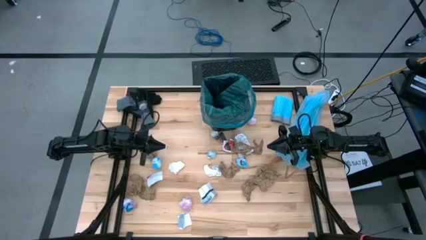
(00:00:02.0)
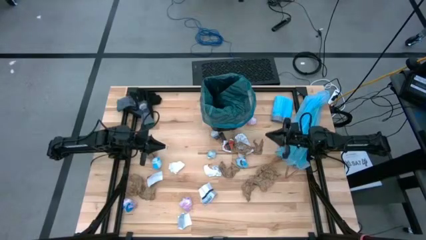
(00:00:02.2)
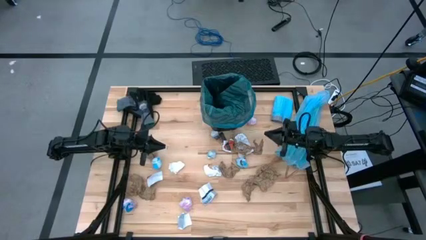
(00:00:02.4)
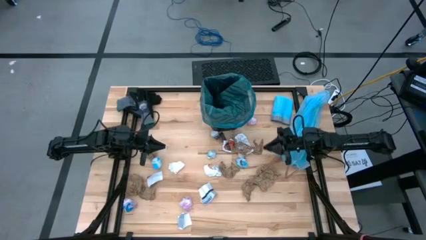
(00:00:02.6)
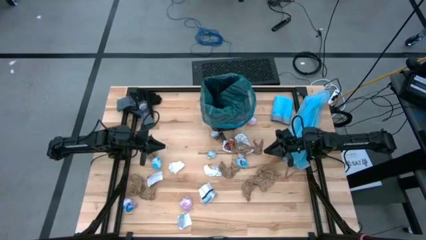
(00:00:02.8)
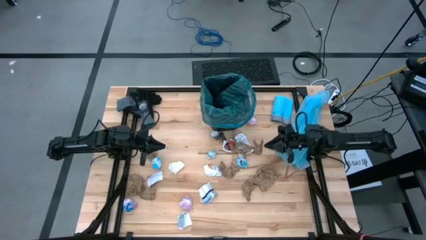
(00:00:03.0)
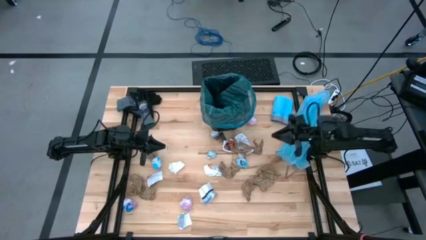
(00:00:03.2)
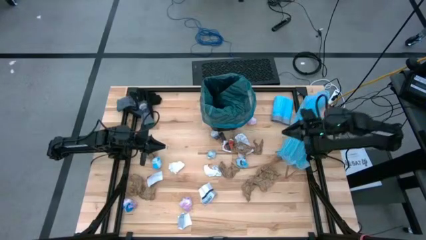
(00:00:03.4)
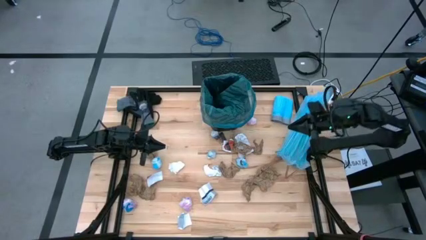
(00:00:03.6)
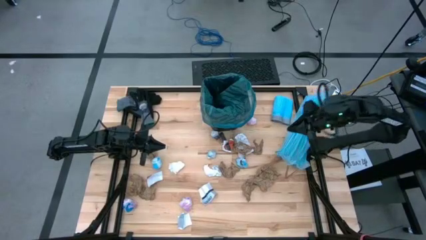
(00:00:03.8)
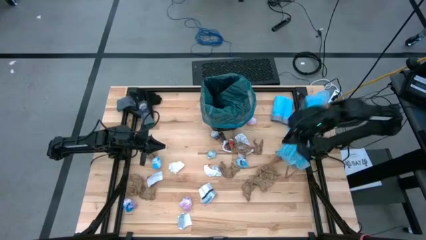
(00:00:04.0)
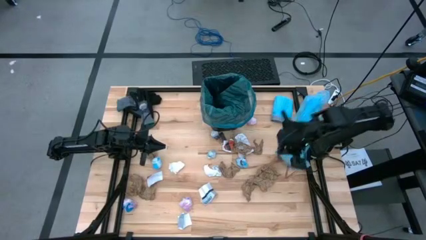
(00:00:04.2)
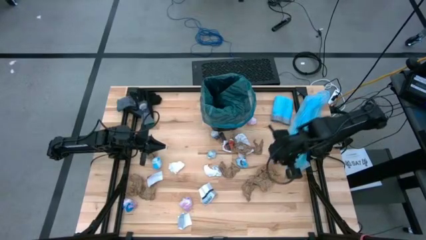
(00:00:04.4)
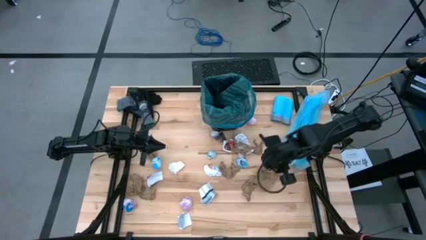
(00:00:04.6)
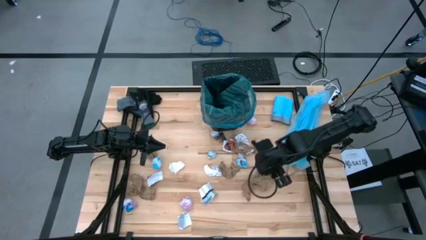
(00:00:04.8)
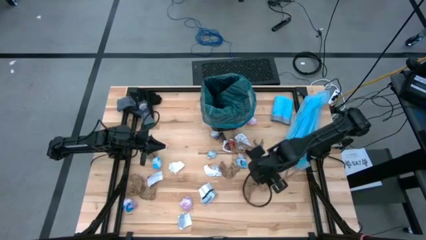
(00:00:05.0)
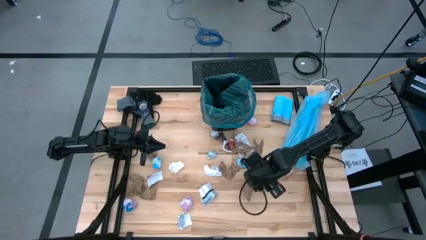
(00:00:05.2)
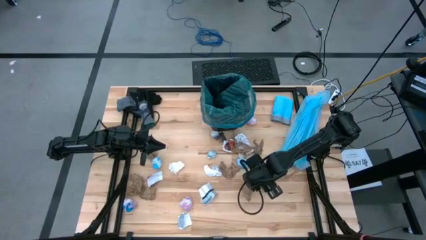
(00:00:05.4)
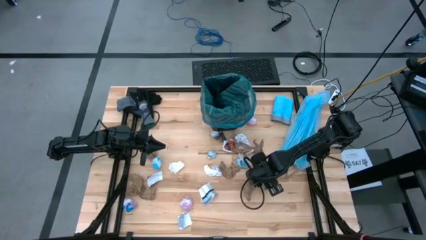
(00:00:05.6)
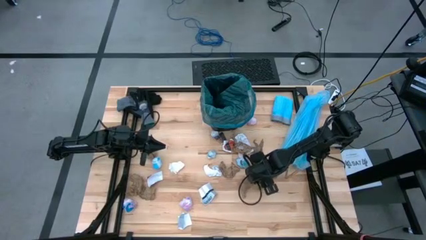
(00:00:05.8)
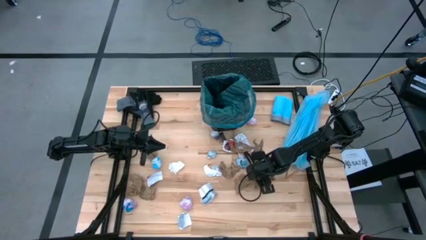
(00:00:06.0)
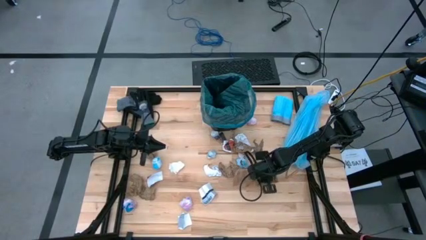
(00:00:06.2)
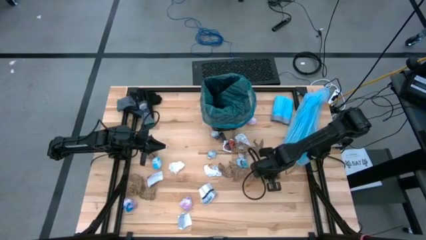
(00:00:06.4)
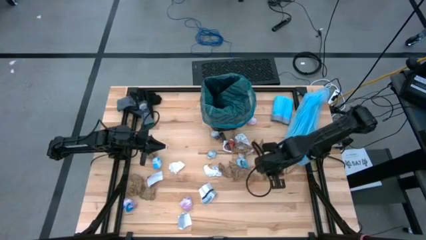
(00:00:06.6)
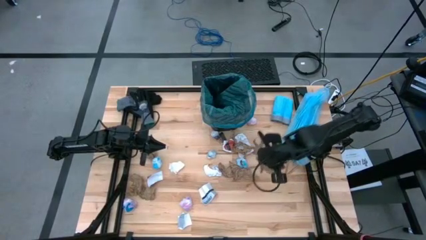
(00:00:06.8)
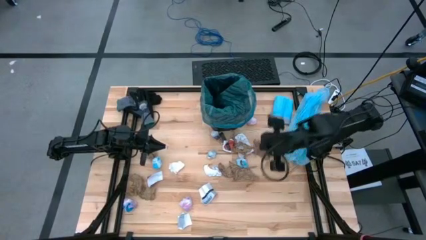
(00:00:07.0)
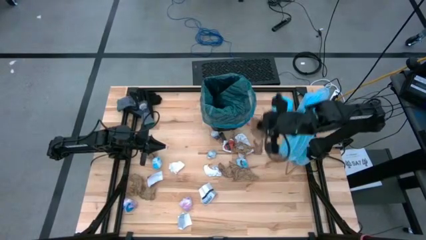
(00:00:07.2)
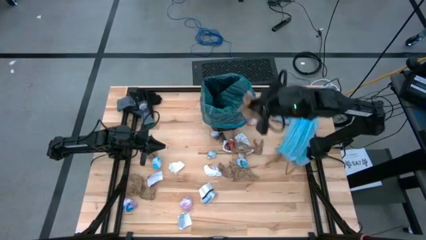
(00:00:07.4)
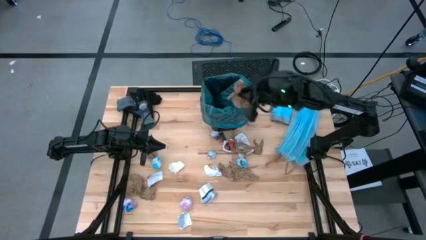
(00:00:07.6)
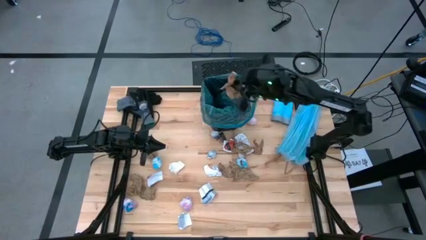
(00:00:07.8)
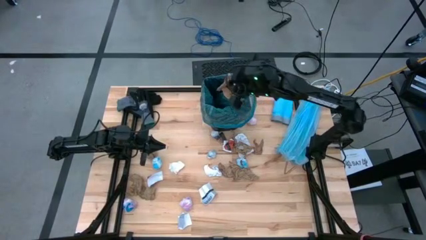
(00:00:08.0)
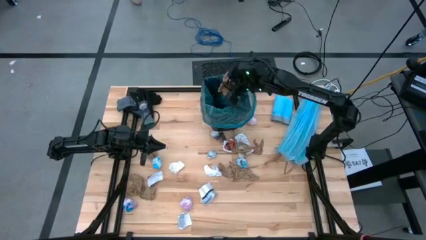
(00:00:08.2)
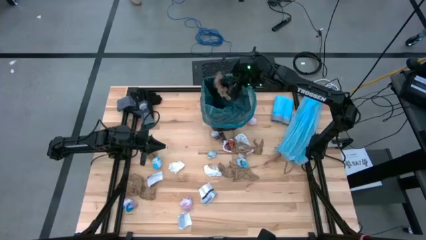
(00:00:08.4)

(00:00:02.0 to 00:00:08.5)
Task: place trash/remove bag and relplace
Put the brown napkin into the trash bin

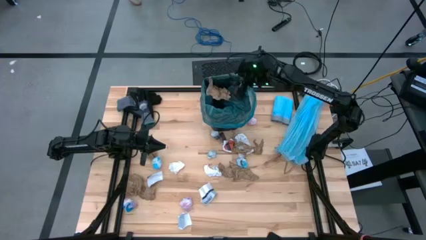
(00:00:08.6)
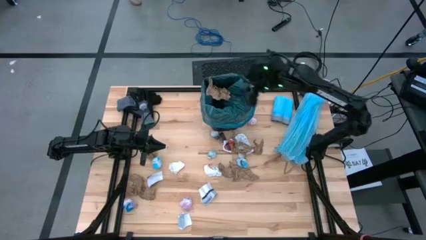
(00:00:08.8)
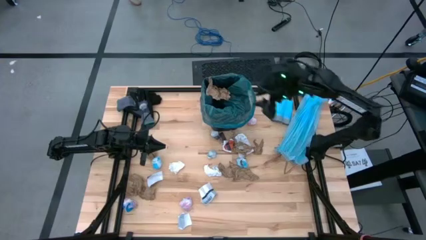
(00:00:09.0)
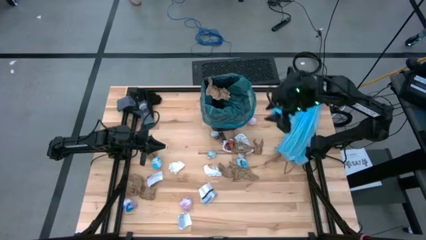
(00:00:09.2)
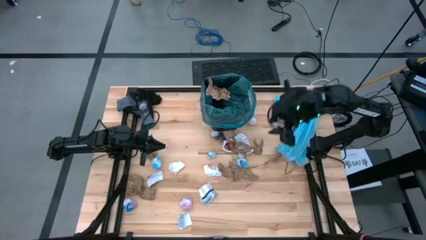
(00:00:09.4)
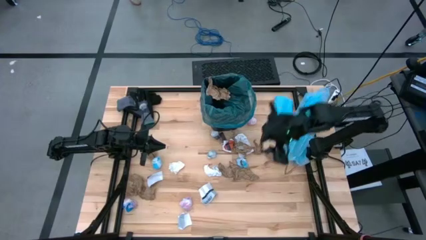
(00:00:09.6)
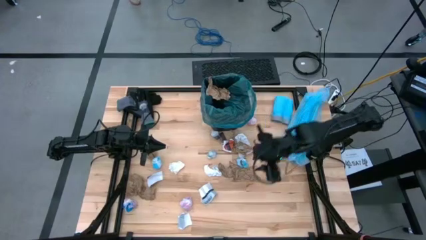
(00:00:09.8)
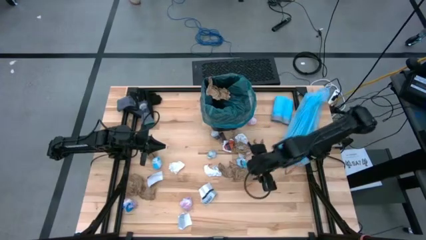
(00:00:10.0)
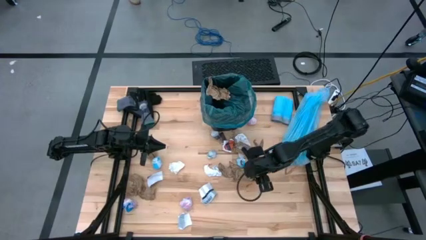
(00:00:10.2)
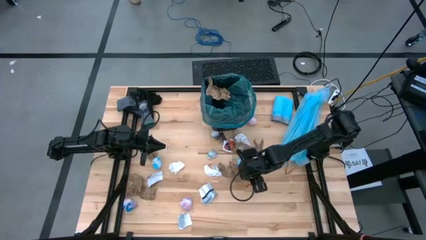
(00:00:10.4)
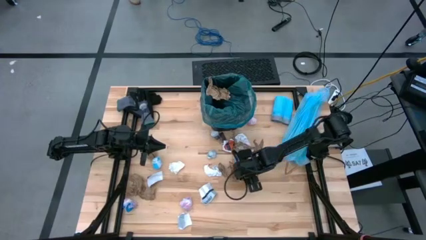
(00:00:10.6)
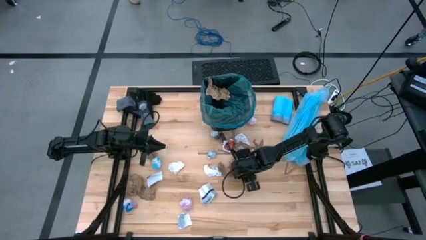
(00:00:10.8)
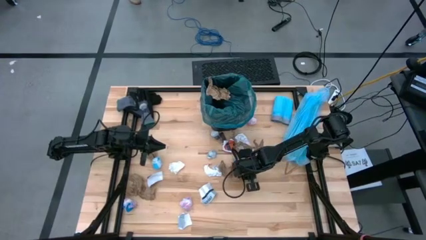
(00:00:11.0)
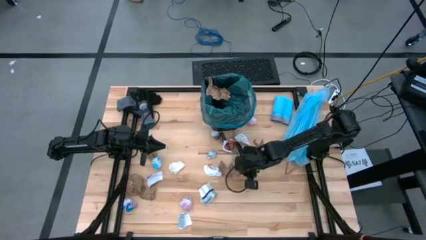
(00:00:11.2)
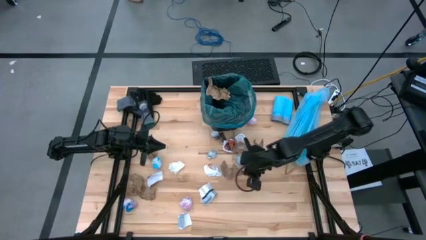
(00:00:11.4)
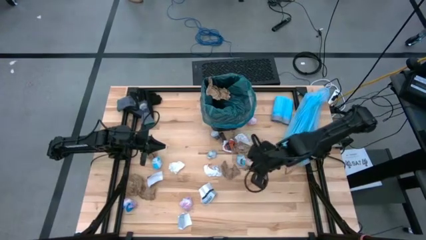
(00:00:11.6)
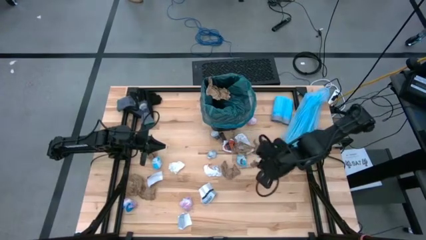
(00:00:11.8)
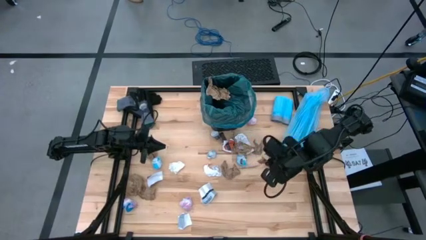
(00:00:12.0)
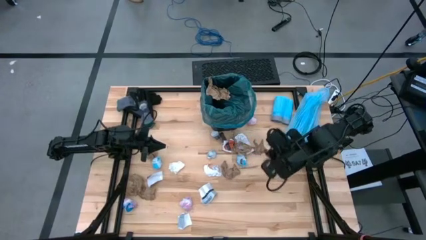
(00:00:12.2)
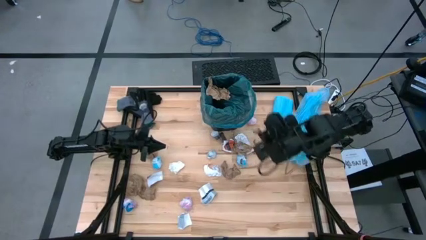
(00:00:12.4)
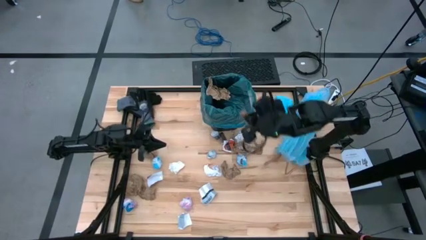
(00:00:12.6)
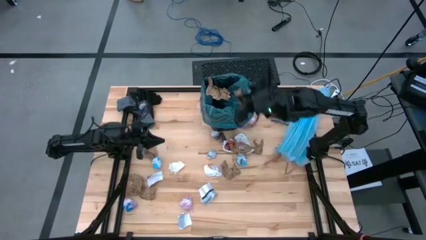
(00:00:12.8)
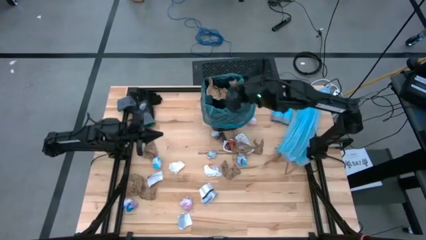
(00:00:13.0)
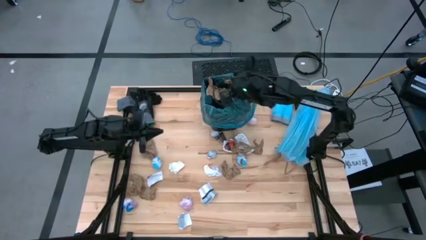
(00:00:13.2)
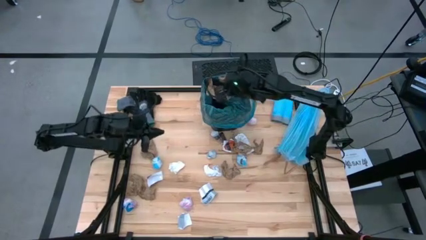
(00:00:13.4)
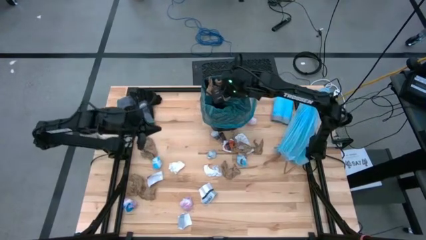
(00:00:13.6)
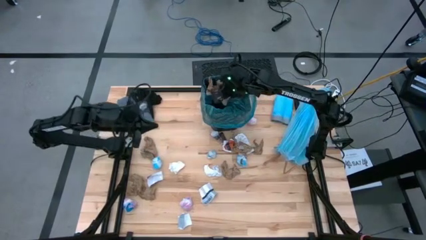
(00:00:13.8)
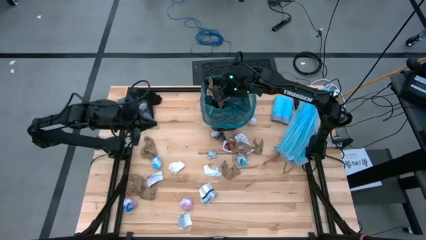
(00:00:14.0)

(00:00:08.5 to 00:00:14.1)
Put the brown napkin into the trash bin

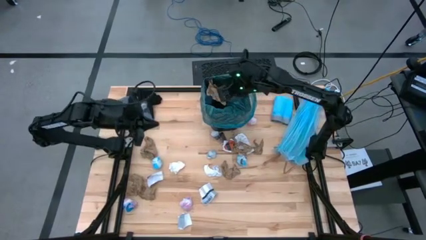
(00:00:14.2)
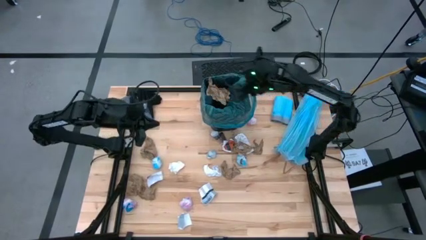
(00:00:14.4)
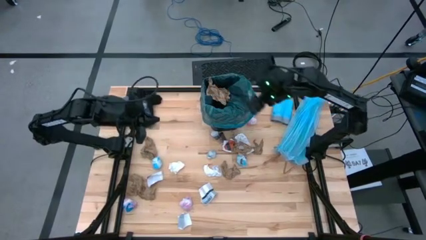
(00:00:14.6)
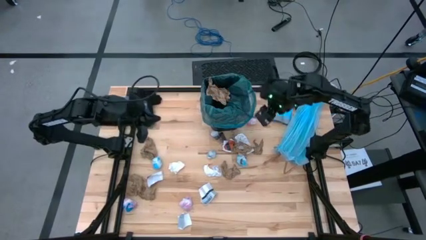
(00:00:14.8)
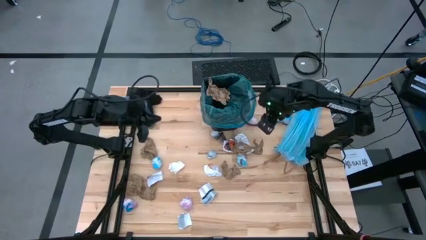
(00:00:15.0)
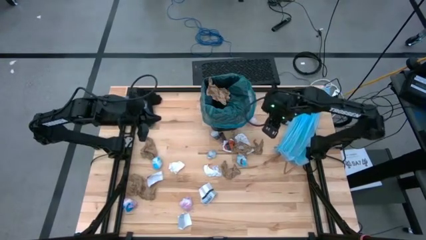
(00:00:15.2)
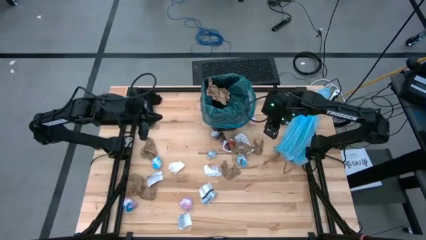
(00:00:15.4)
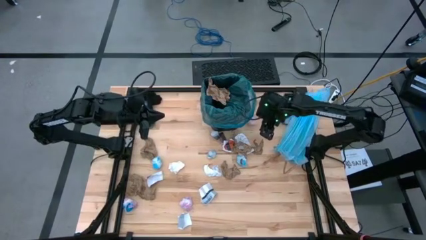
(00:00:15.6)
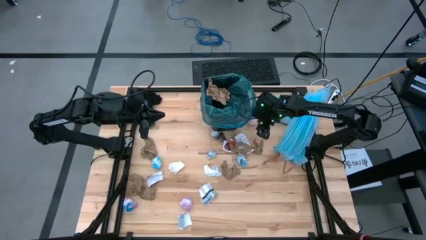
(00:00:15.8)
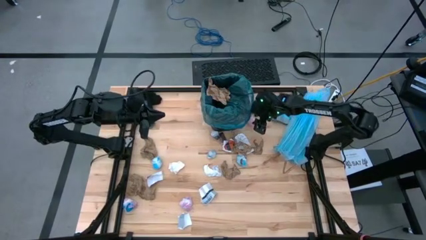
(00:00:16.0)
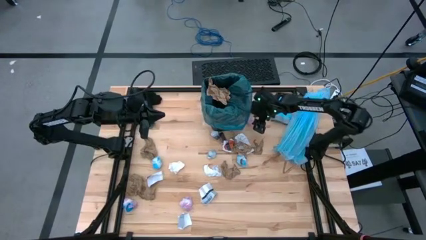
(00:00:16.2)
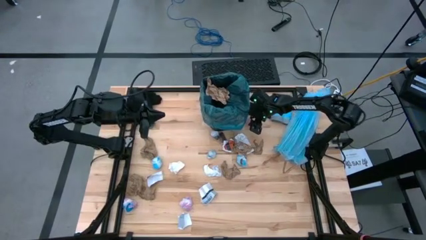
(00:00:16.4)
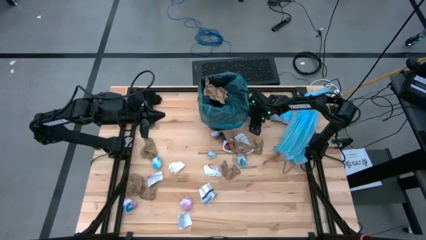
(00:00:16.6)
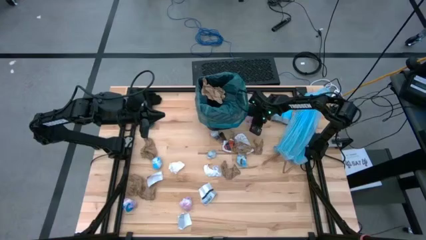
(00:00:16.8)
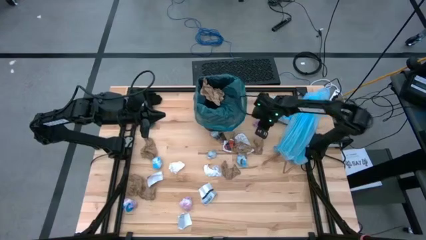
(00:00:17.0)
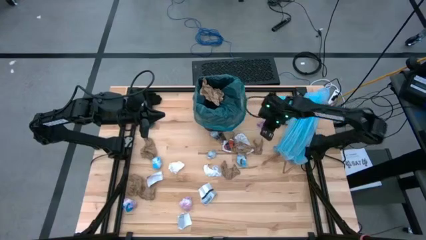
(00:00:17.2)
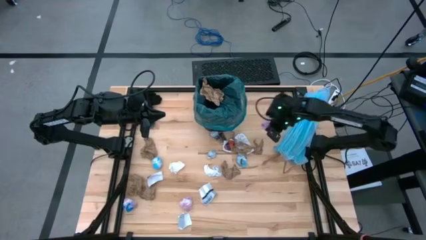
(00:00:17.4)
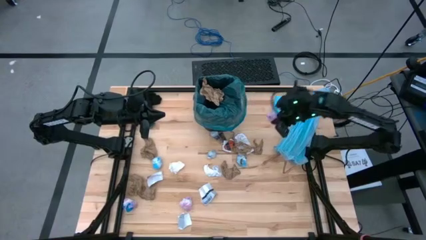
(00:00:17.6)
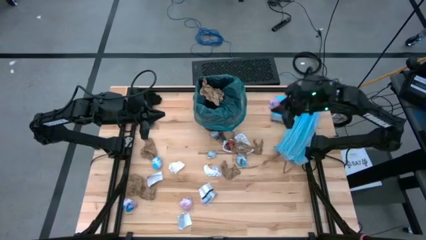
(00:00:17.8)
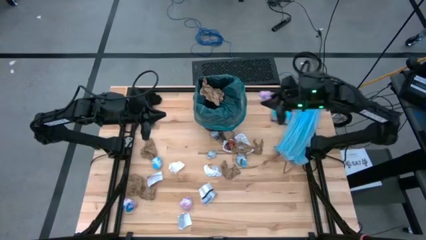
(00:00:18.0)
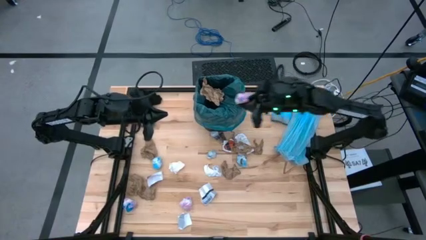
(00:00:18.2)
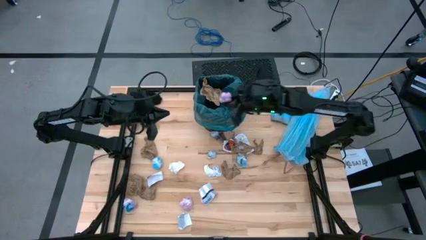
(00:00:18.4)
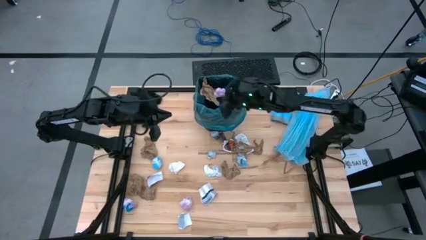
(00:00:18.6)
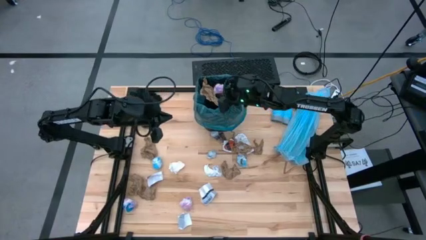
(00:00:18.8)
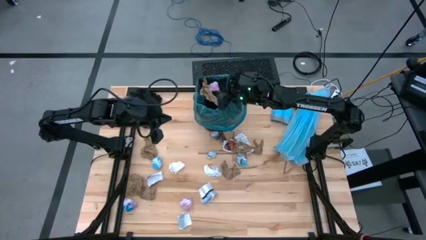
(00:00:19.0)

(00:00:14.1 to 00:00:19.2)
Put the pink plastic into the trash bin
